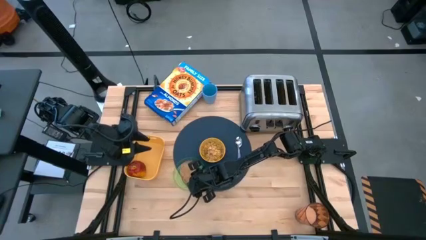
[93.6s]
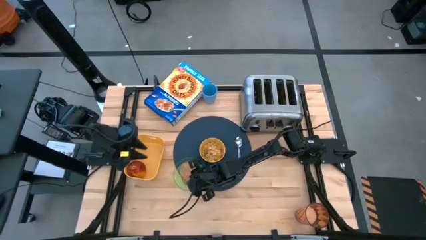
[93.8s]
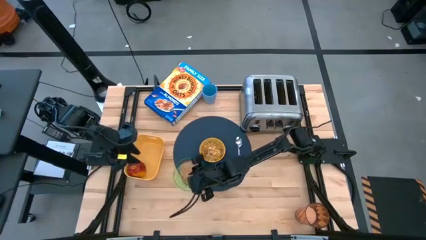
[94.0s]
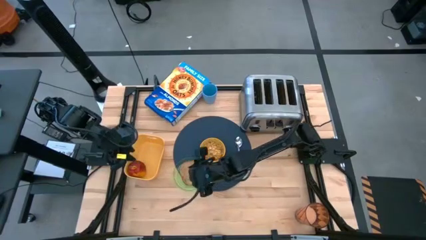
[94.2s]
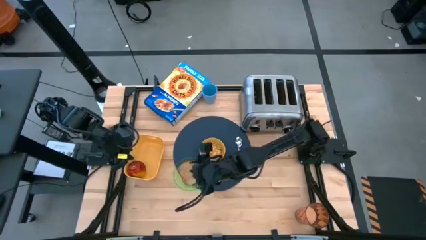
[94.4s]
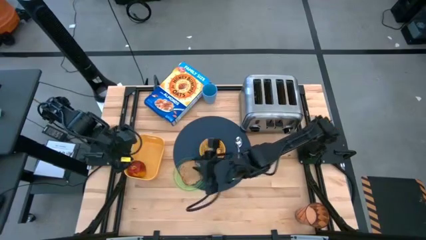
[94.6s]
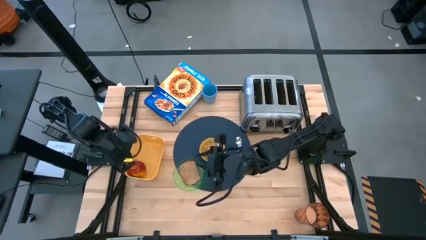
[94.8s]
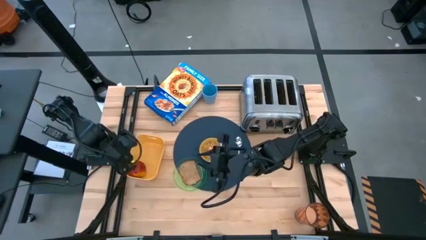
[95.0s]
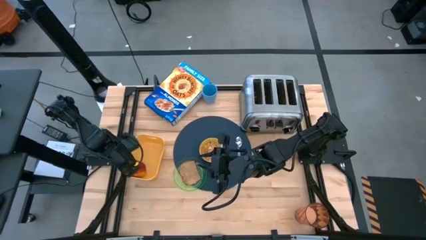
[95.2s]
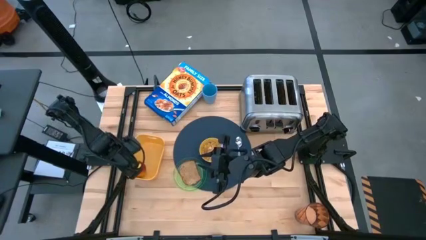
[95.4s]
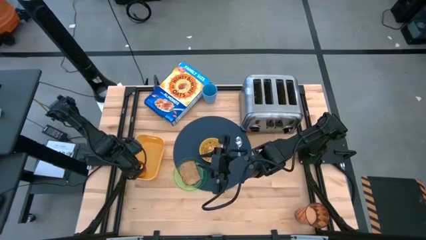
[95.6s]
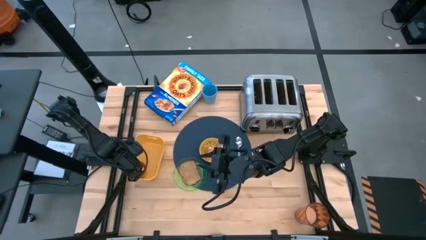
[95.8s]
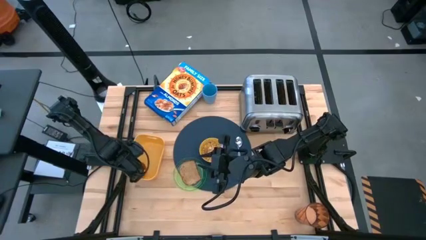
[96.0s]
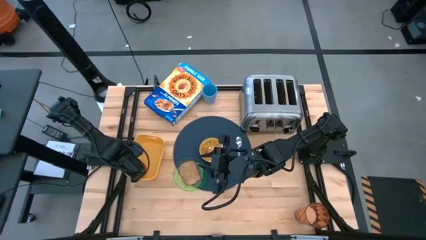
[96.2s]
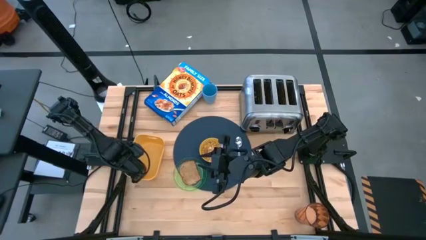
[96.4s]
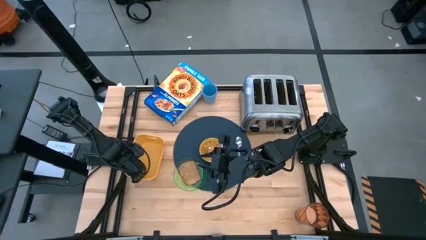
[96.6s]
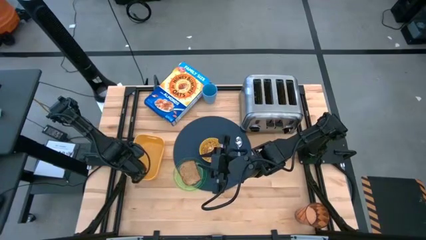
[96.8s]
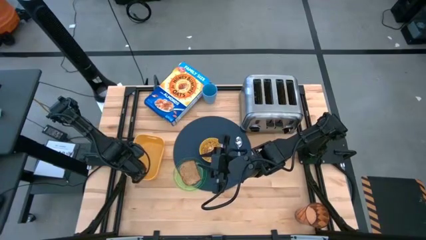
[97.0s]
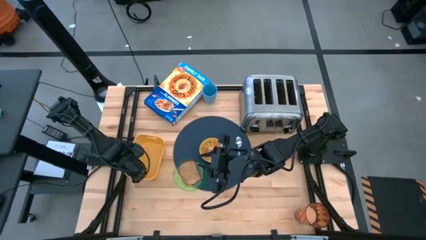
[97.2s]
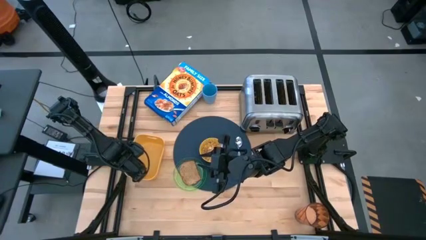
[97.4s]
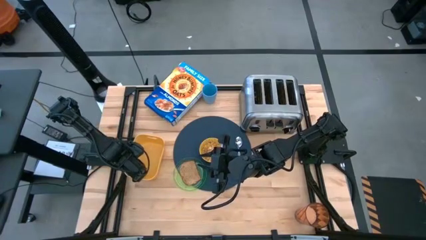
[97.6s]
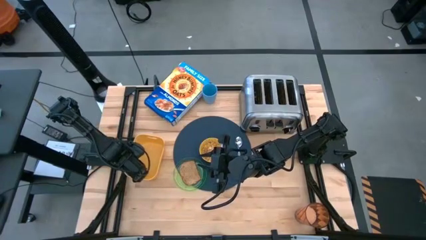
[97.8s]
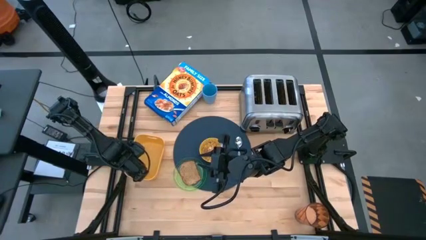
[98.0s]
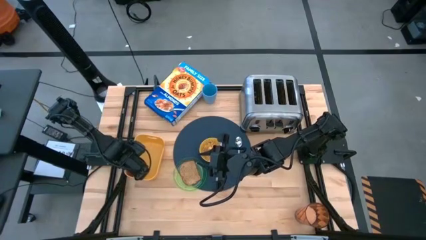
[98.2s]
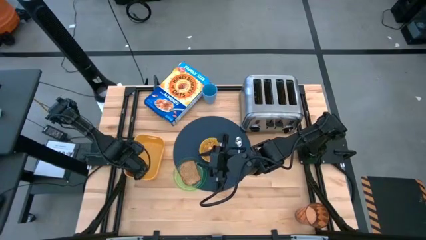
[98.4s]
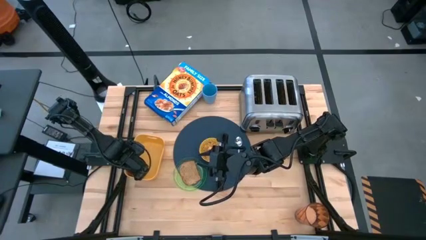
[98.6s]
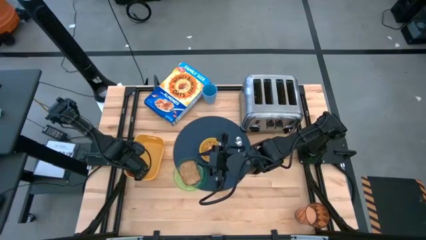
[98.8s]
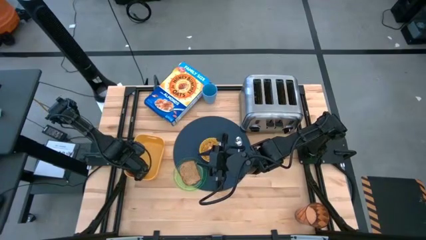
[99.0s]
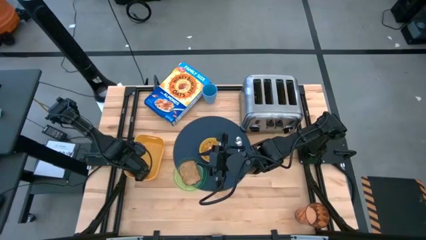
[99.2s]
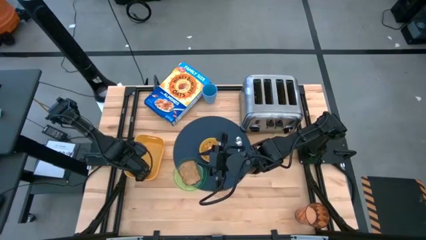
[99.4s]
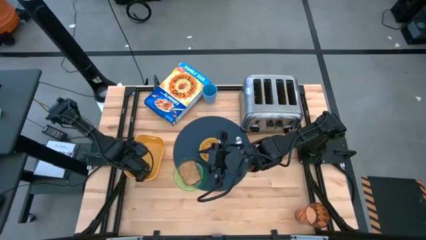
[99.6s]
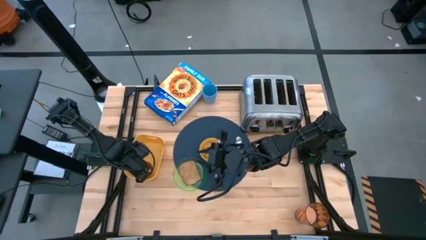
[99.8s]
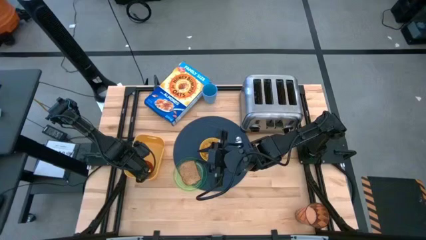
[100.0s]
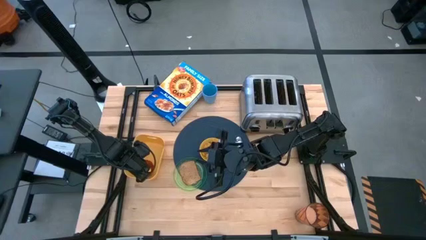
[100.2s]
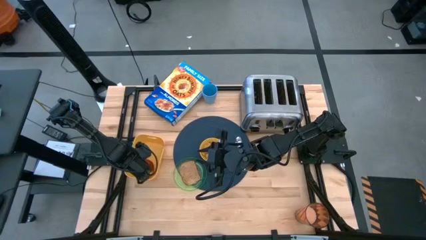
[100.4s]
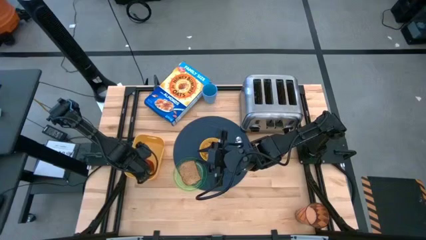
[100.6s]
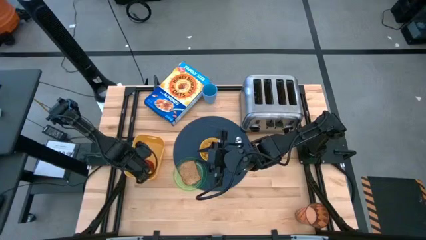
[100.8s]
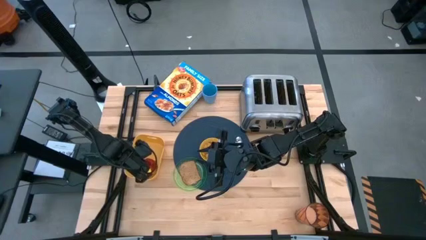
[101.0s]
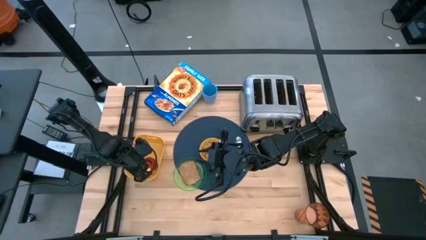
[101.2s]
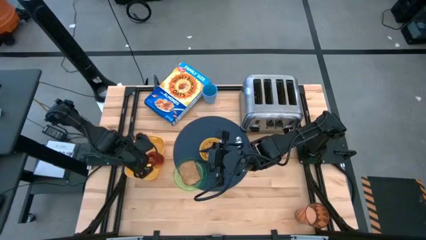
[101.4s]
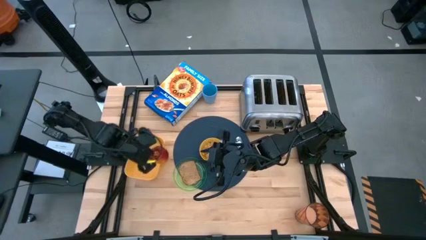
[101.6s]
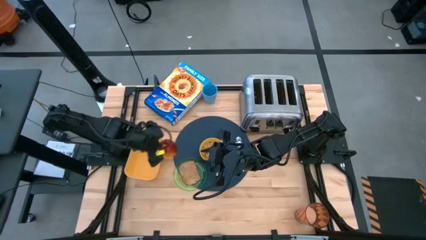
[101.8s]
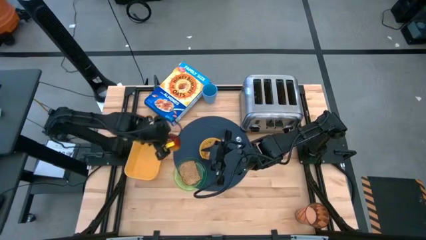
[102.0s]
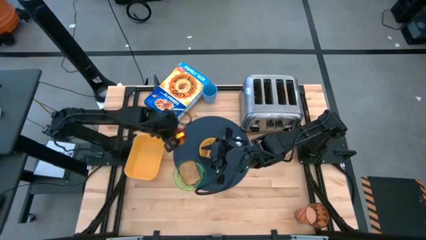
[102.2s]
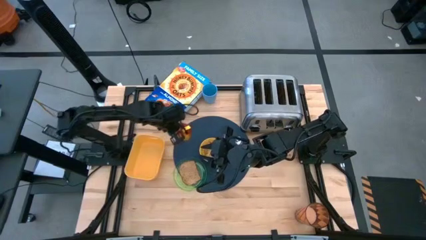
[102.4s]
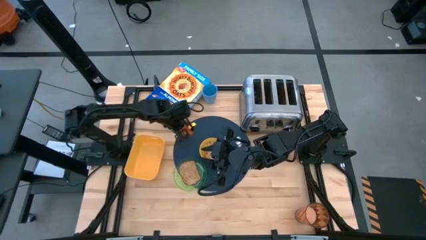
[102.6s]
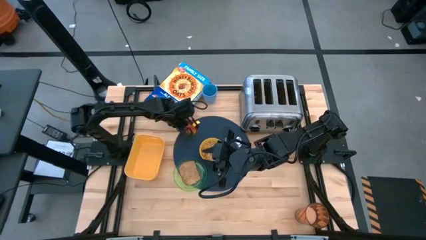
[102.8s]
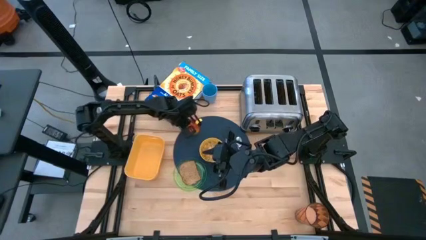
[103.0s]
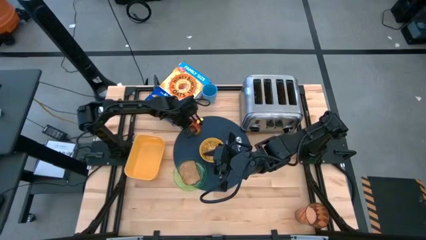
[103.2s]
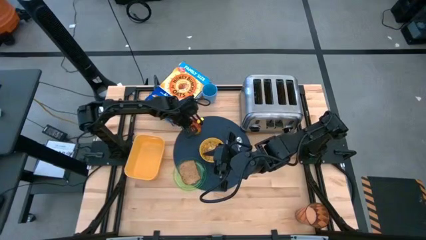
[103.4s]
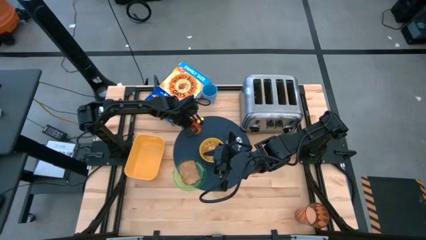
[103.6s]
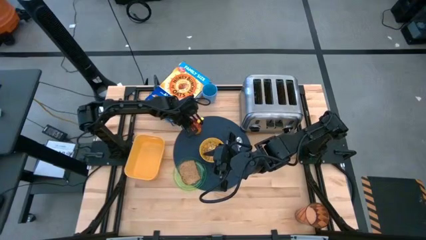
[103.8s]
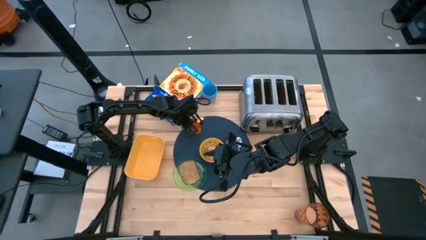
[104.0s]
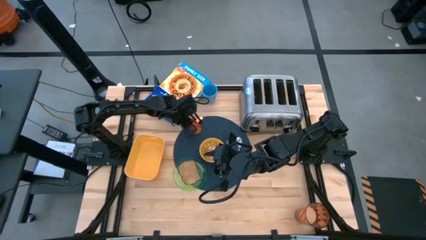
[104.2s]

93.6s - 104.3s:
Task: Arrange a breakfast setting
Put the apple on the mat to the top left of the bowl

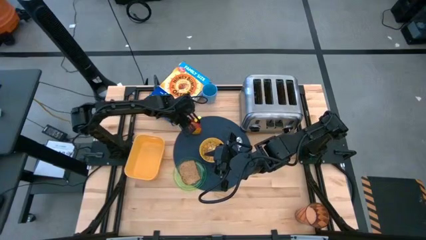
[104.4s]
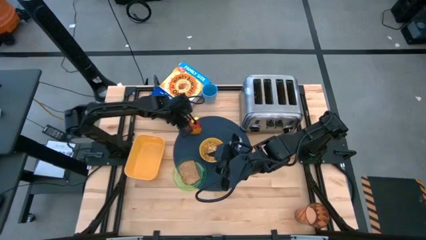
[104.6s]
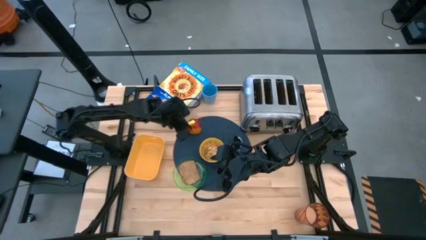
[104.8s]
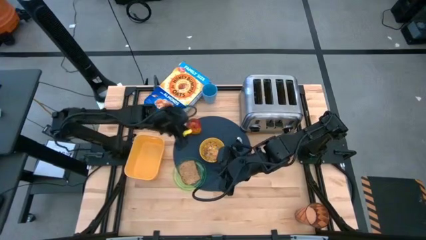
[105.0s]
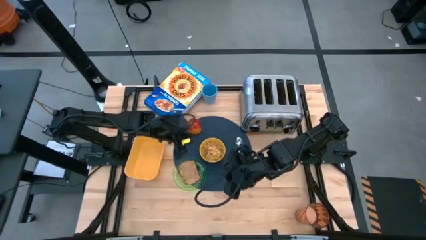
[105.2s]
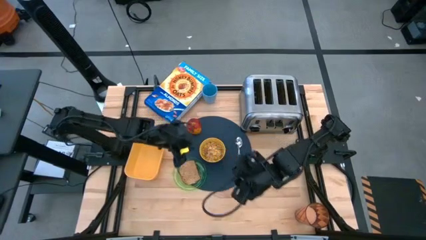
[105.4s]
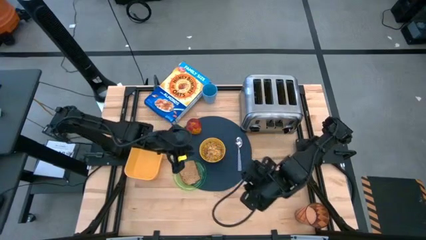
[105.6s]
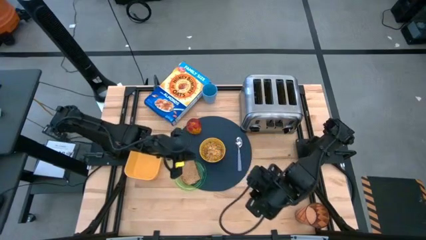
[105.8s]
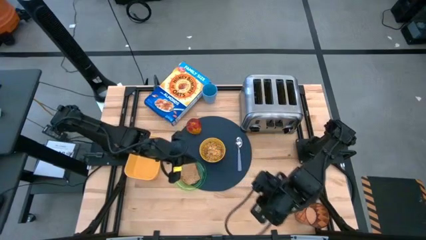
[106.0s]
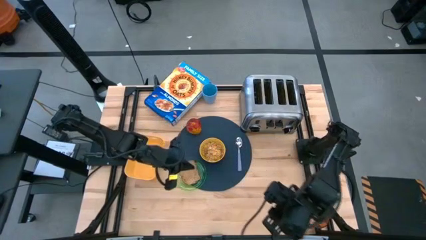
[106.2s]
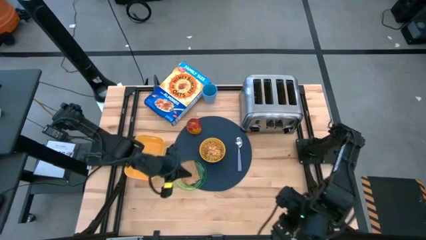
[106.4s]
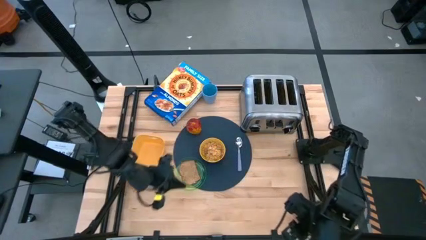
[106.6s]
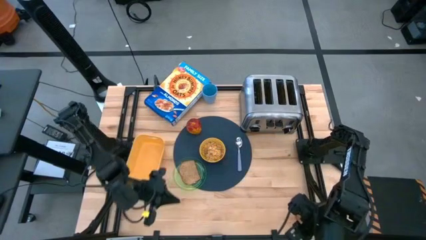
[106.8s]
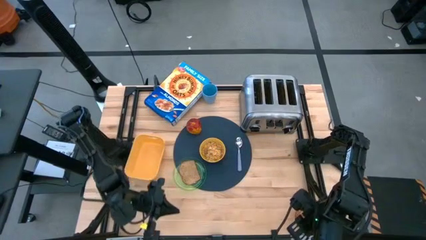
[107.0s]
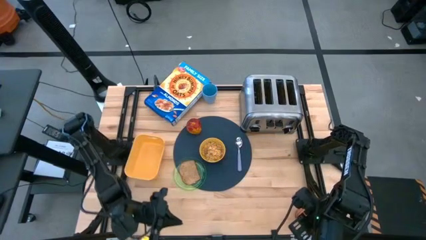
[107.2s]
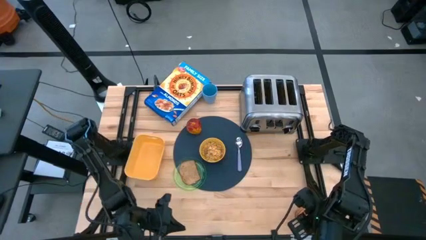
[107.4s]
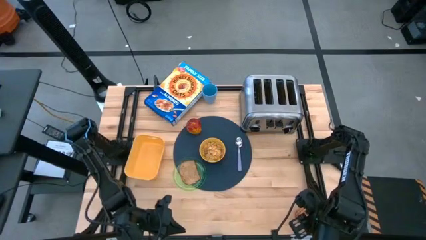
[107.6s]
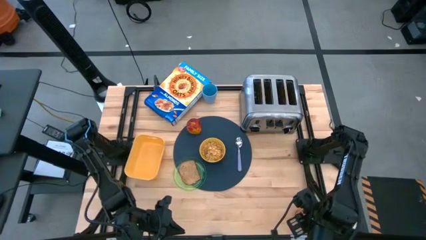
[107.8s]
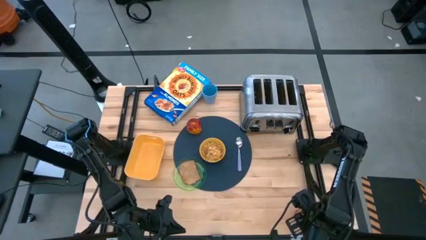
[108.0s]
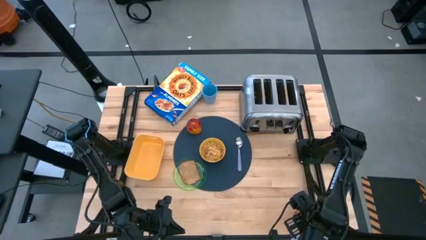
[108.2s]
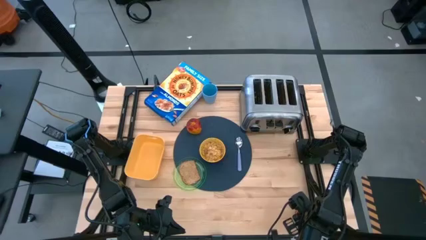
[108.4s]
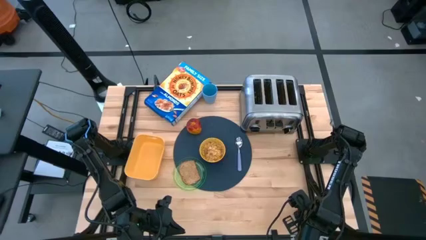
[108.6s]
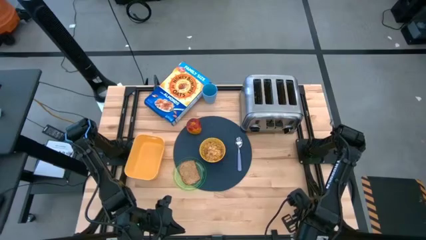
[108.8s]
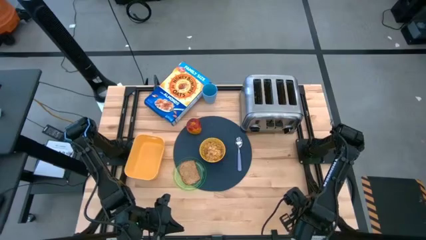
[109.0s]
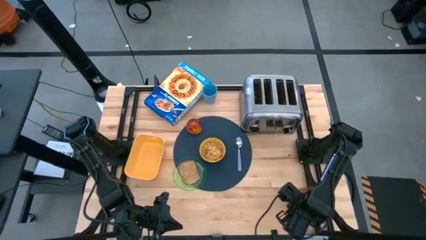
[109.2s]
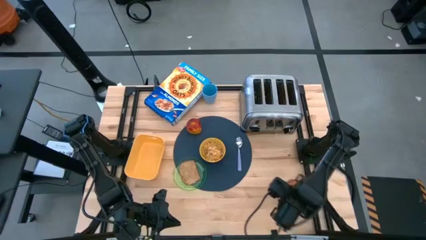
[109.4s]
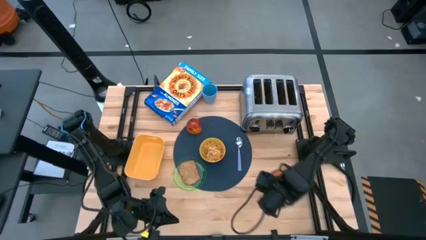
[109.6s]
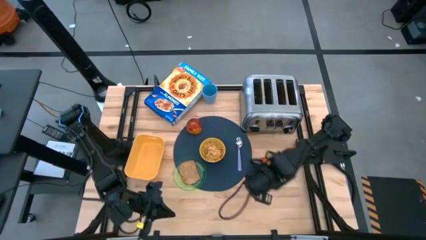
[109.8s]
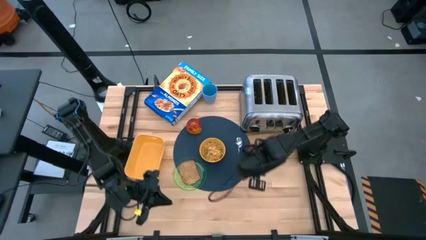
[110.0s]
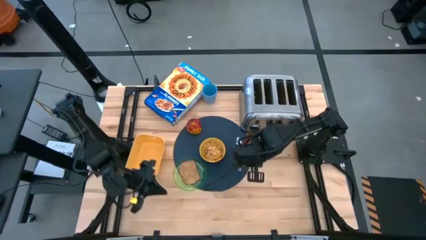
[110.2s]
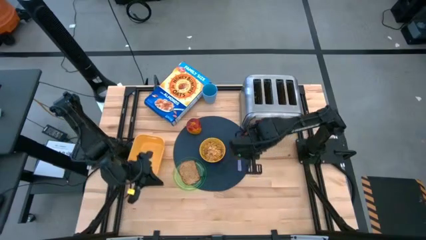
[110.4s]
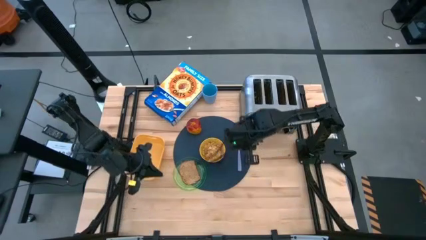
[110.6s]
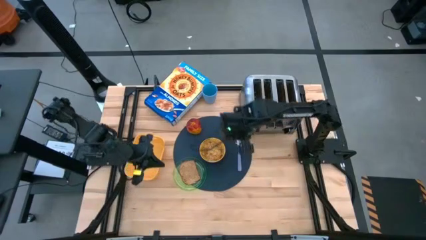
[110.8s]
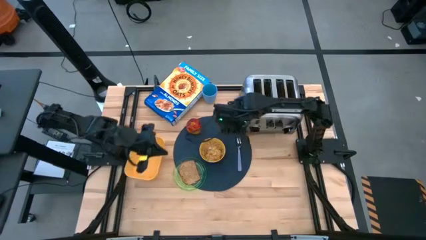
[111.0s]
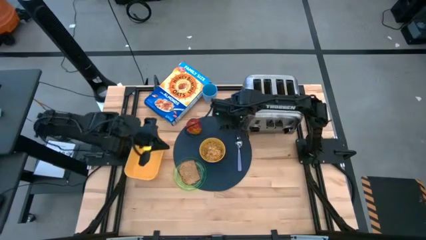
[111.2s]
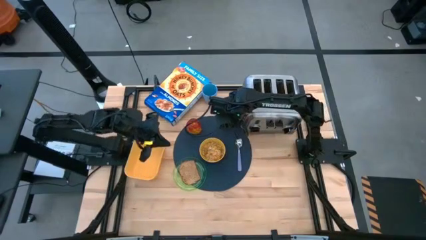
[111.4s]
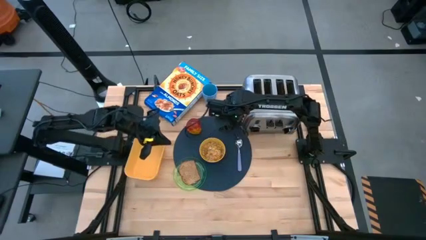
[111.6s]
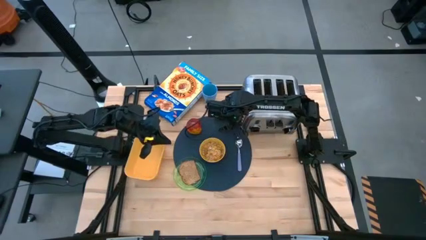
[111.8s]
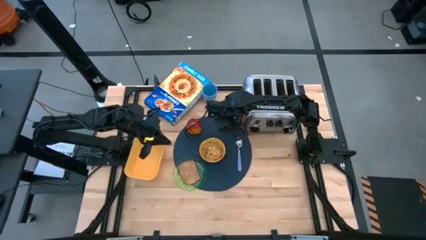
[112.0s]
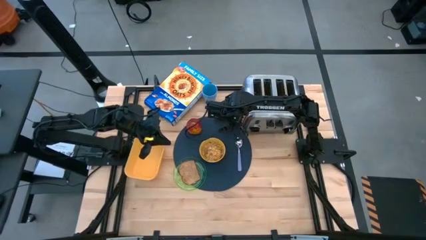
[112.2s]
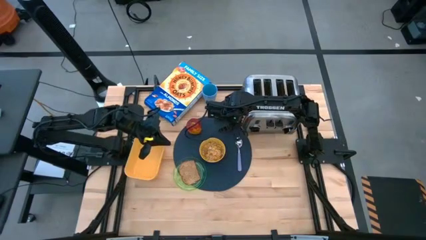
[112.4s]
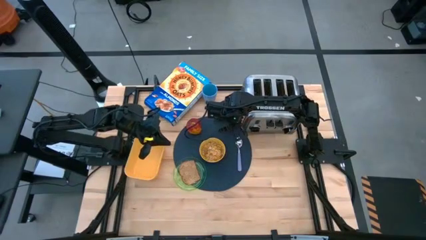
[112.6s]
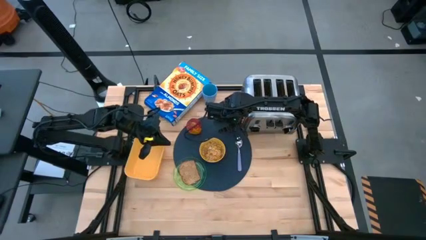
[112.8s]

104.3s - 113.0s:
Put the cup with the milk on the mat to the top right of the bowl
